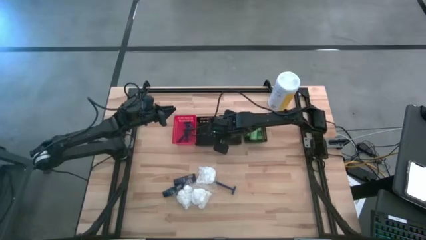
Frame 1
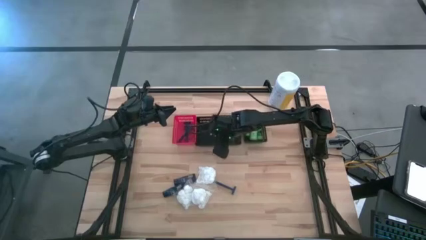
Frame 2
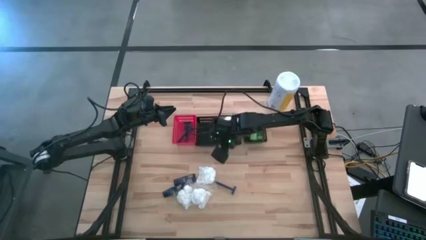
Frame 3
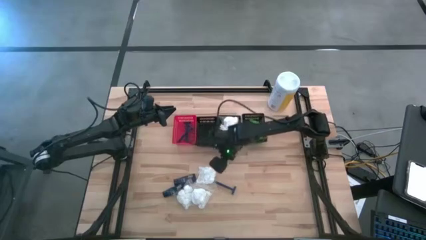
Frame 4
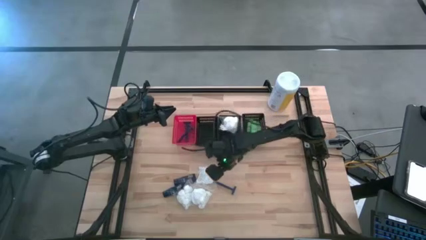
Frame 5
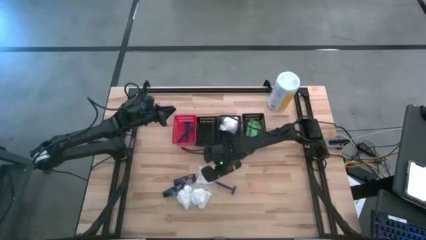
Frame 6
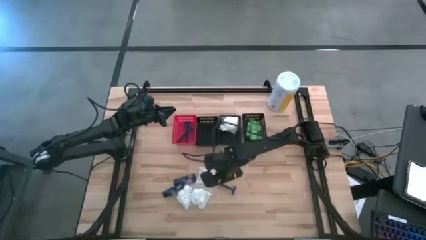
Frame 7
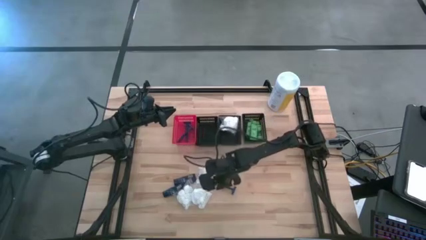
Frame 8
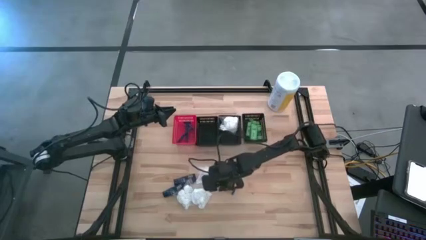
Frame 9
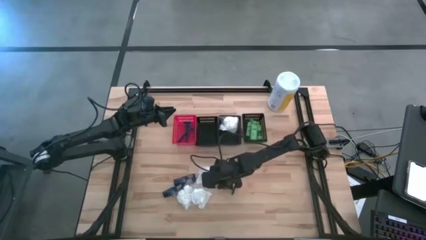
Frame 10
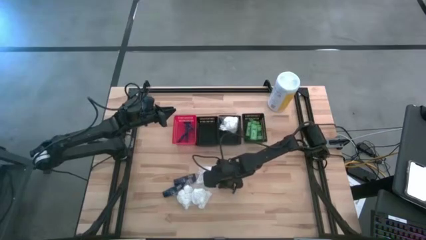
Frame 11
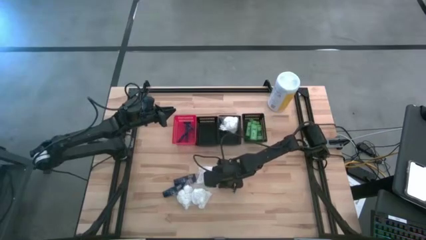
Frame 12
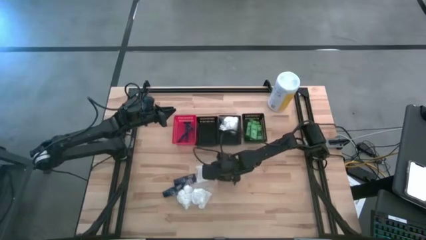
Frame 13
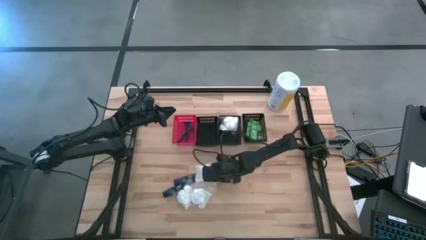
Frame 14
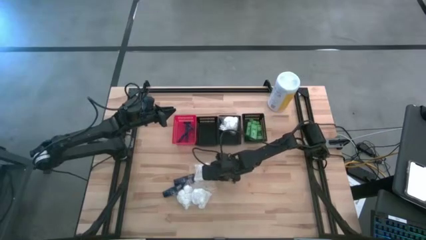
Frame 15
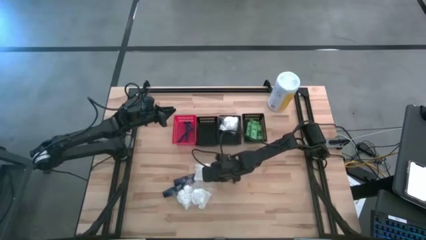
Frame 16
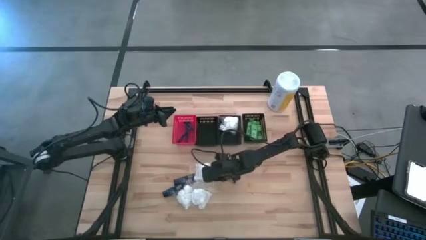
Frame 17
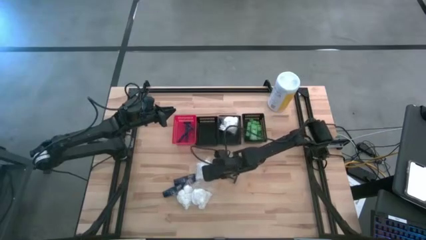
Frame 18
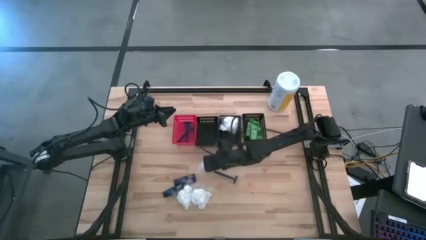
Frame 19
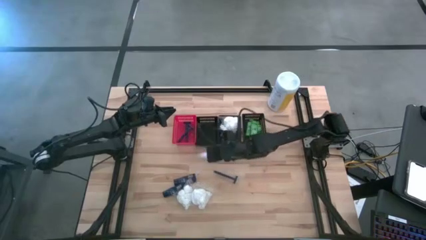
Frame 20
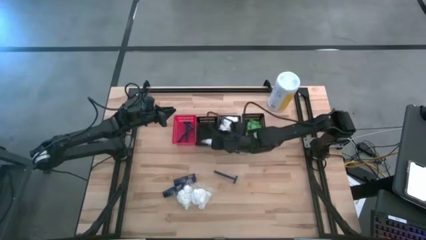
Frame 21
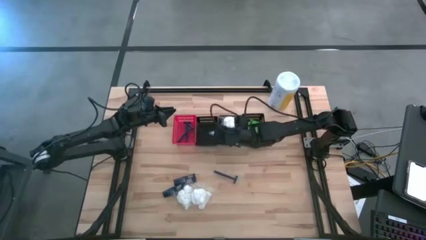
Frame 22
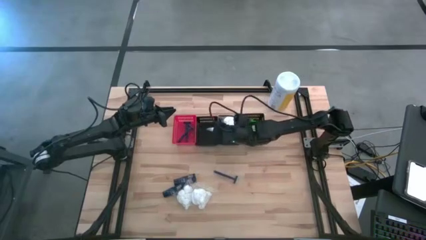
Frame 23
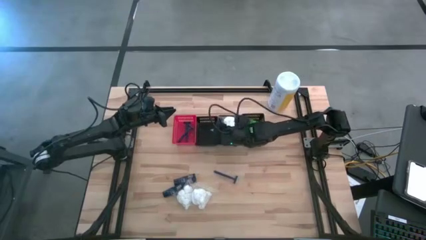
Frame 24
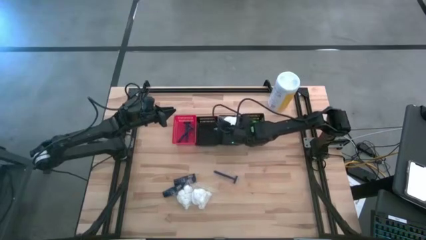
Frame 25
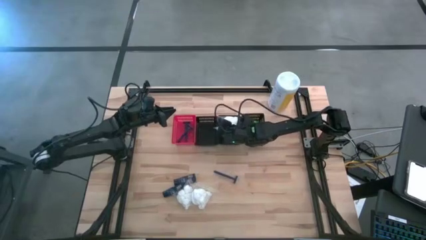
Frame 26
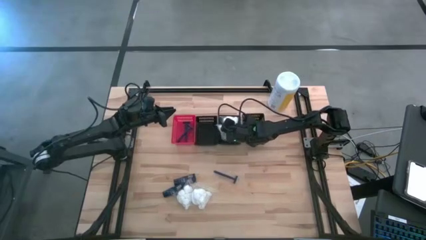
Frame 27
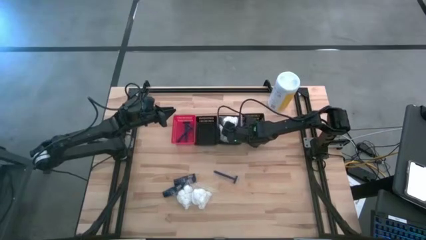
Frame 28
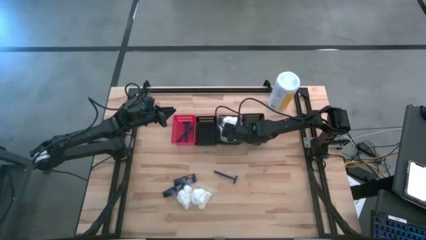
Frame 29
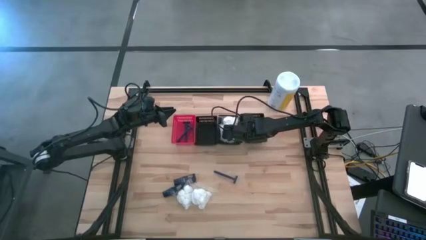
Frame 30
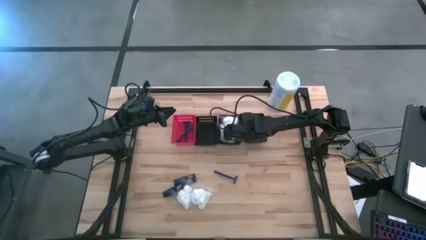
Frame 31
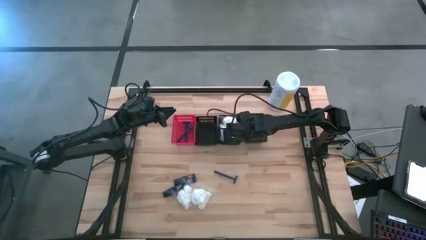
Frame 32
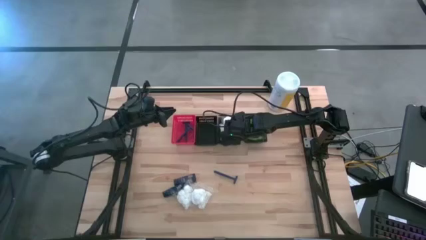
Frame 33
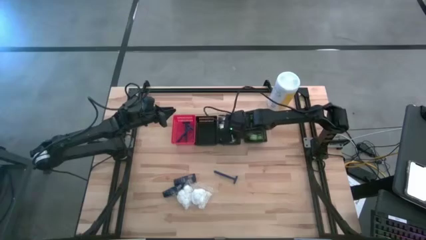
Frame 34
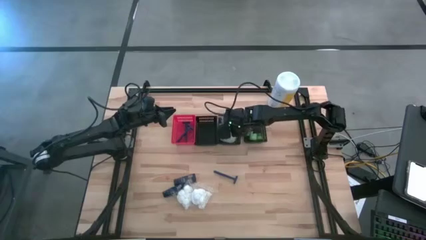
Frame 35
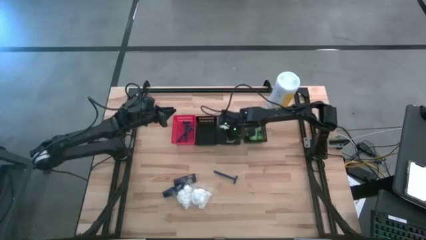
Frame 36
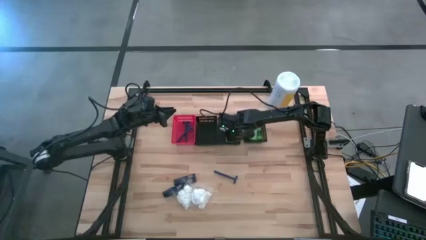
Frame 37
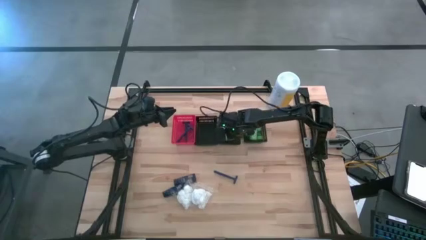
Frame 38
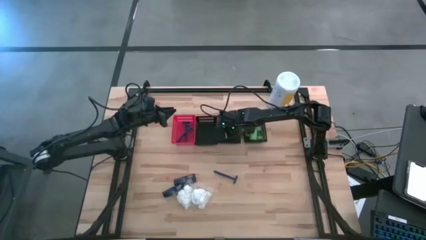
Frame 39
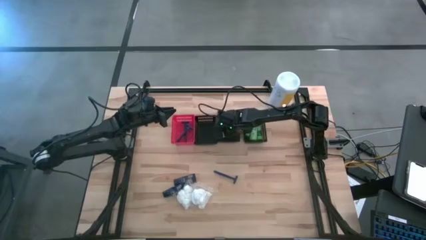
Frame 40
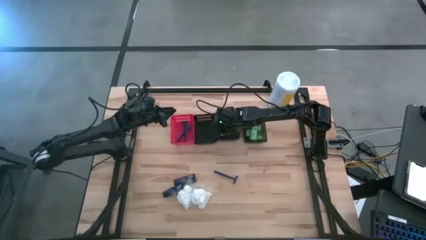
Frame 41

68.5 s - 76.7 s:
Task: Pick & Place Travel size toiletries
Put the cotton pack into the middle black bin

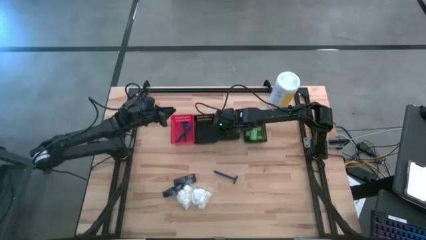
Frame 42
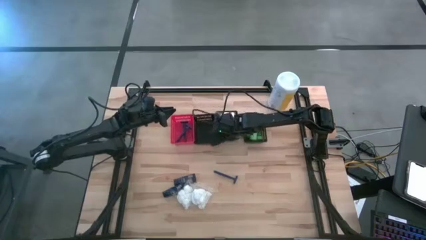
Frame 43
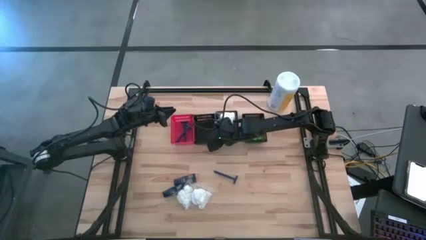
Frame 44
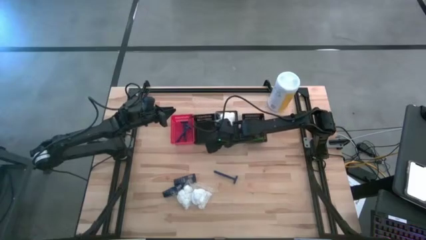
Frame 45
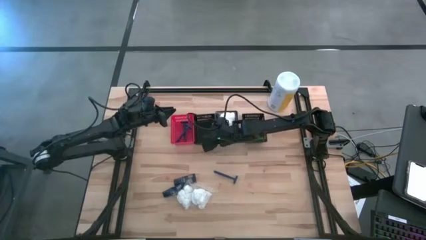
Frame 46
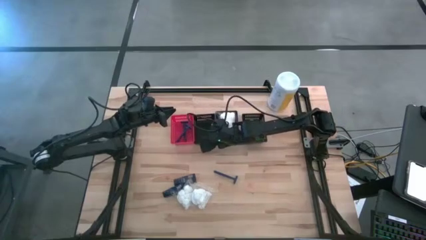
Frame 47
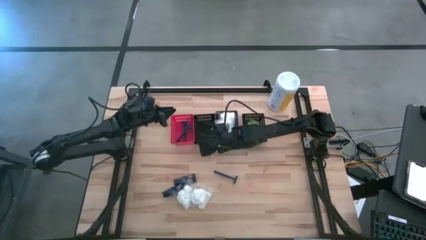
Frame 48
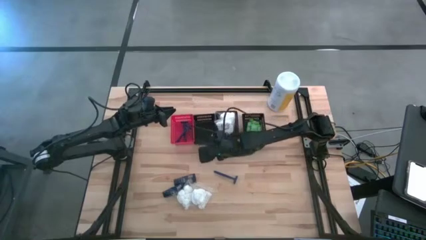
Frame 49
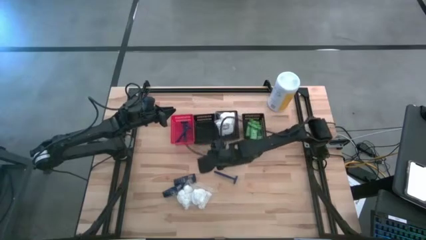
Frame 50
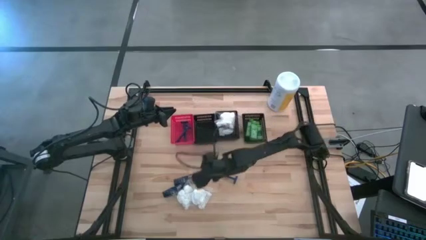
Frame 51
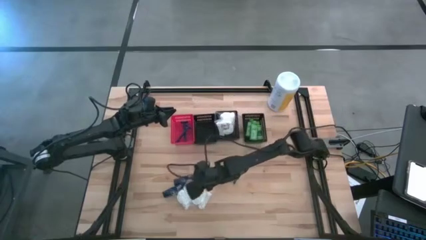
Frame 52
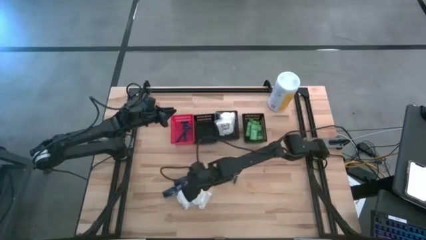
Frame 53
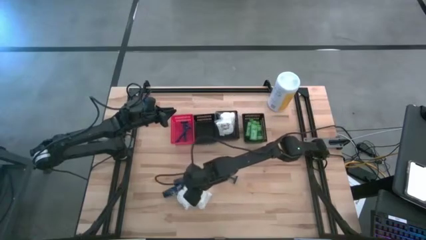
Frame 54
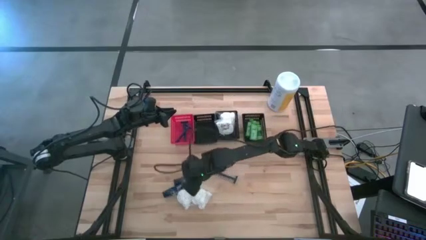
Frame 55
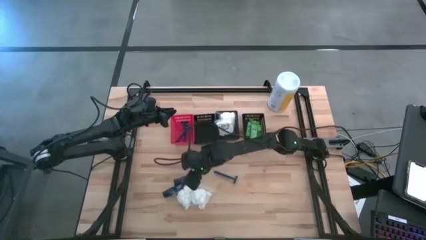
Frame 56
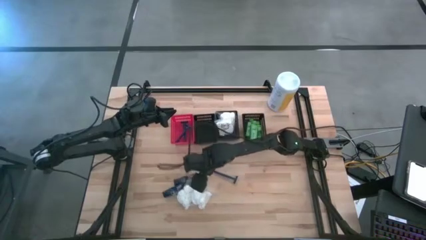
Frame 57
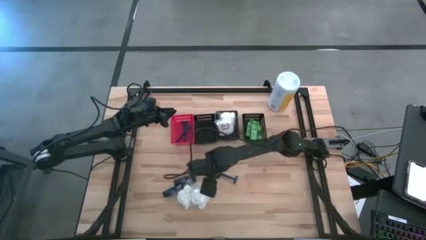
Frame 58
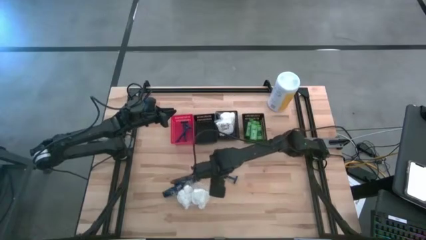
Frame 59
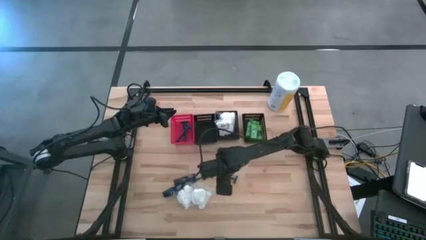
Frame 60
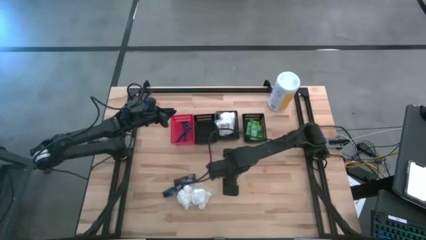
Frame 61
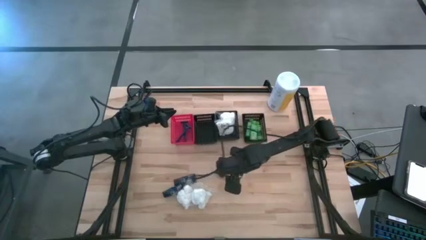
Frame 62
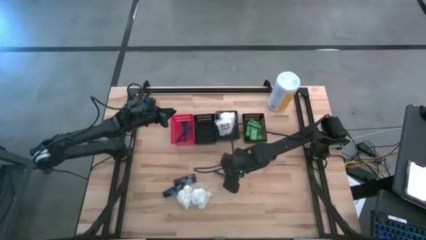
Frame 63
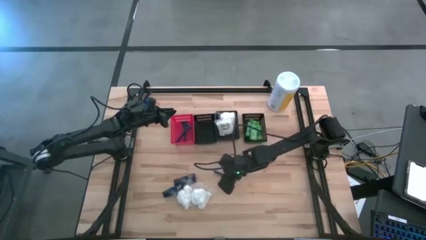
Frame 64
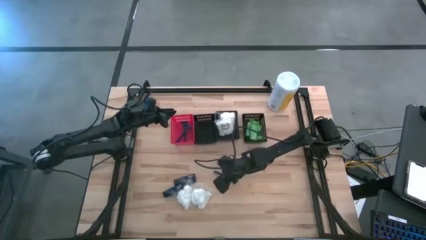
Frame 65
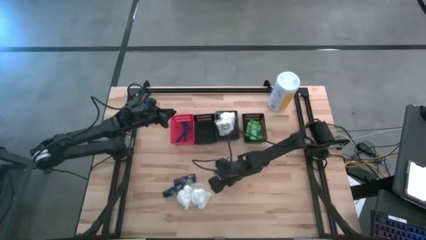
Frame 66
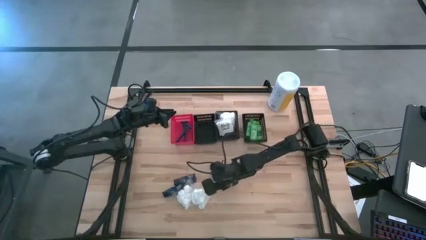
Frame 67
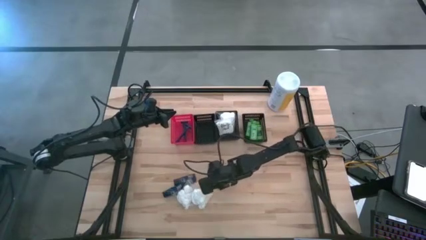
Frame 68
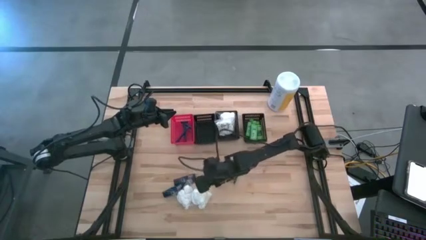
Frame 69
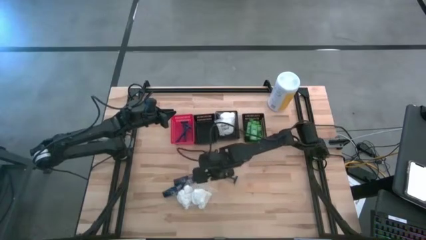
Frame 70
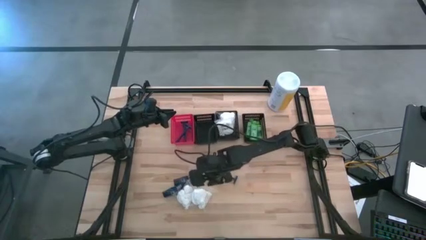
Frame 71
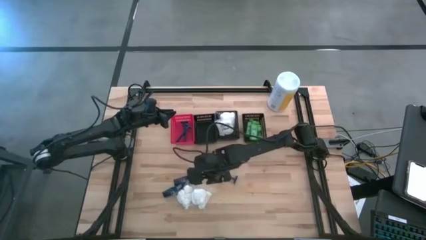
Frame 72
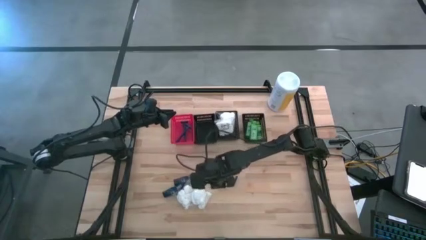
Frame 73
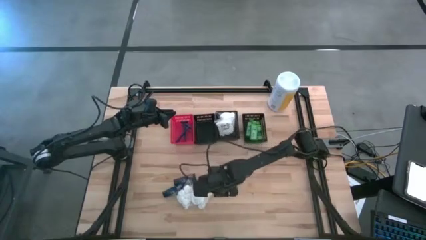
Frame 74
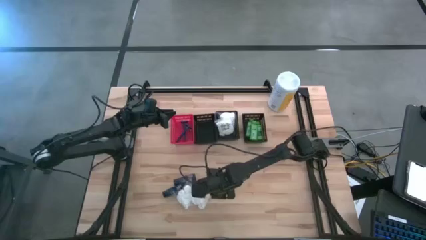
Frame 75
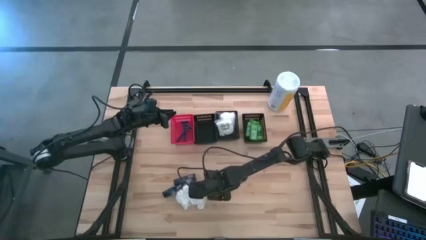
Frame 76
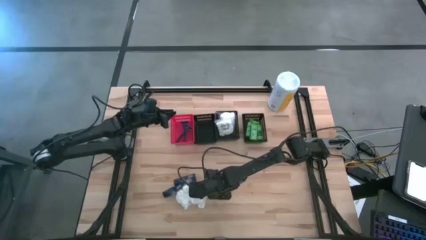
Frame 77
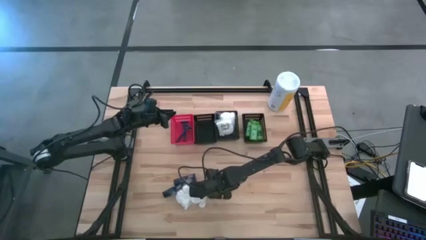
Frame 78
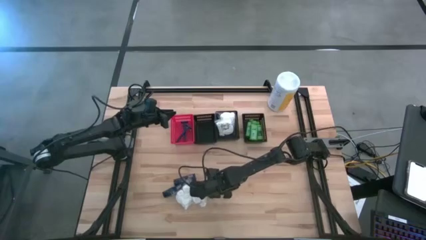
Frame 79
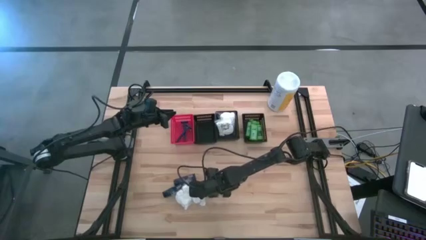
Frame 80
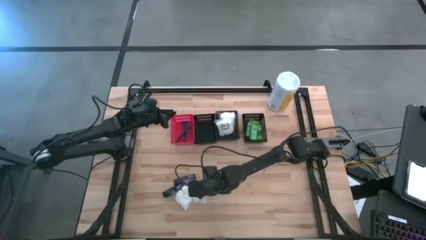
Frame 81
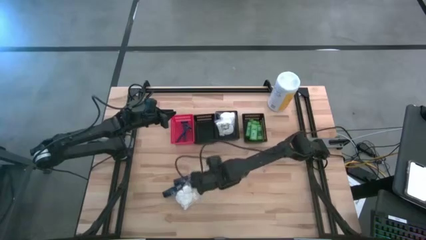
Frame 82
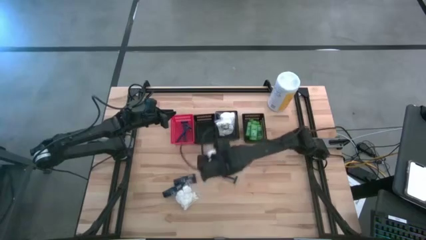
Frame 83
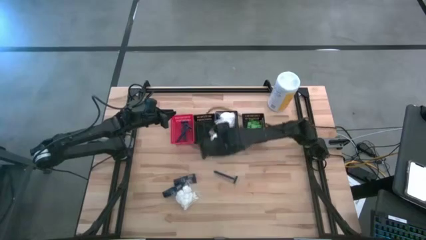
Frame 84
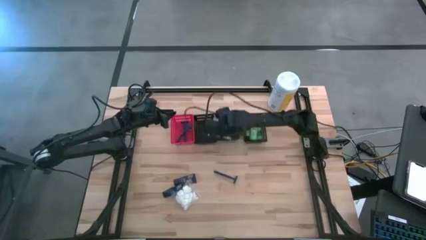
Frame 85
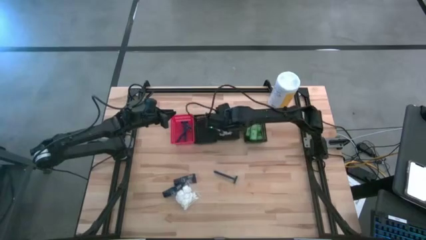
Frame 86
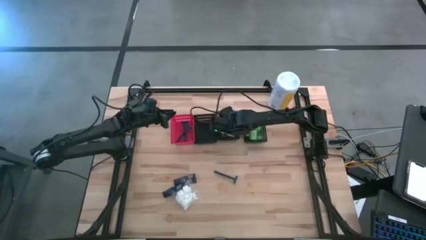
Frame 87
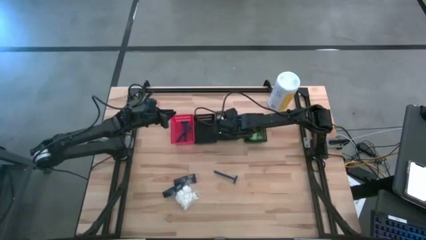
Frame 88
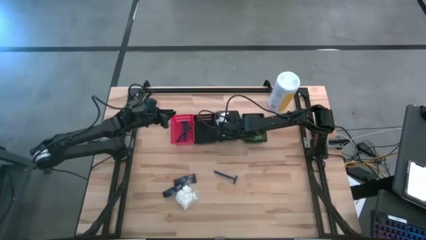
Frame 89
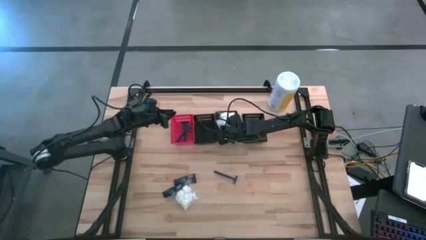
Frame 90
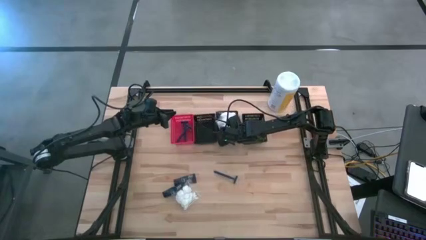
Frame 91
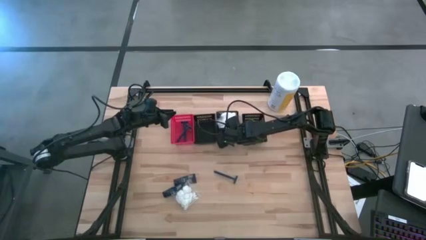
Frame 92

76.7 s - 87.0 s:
Put the cotton pack into the middle black basket
